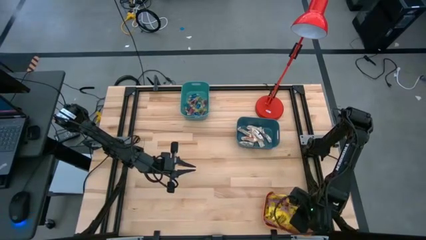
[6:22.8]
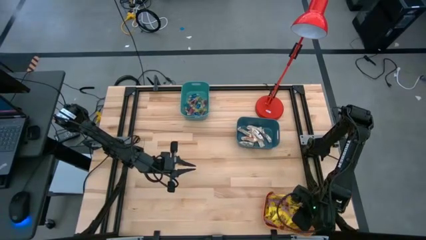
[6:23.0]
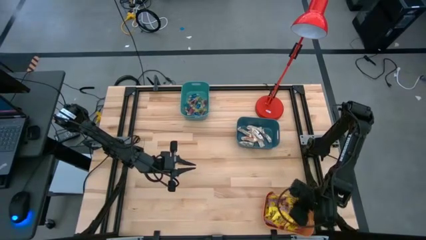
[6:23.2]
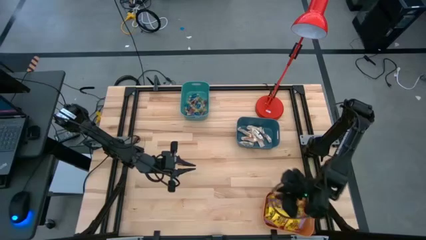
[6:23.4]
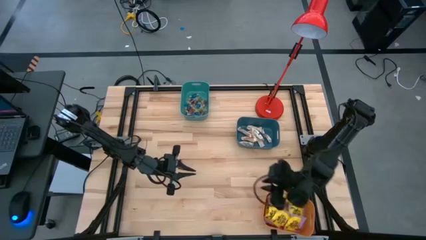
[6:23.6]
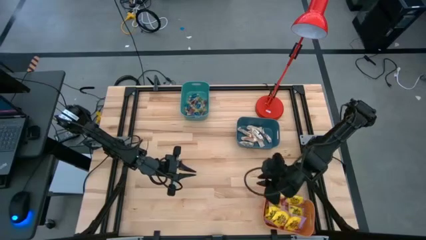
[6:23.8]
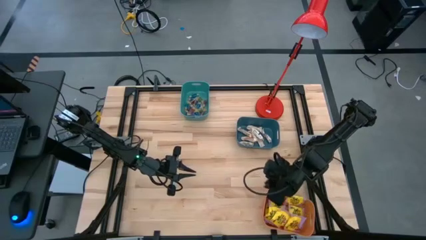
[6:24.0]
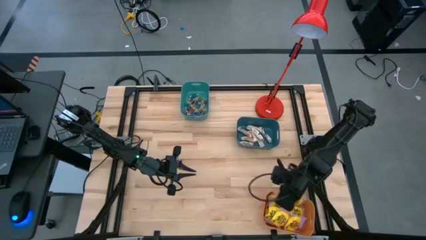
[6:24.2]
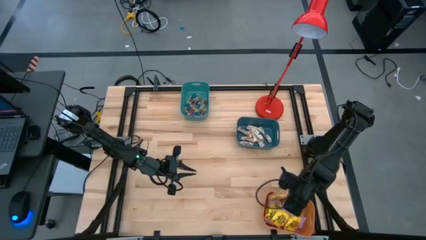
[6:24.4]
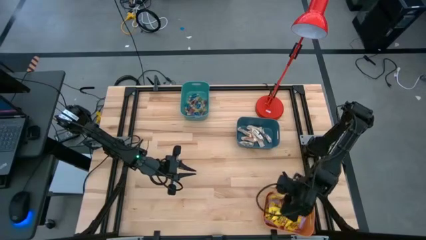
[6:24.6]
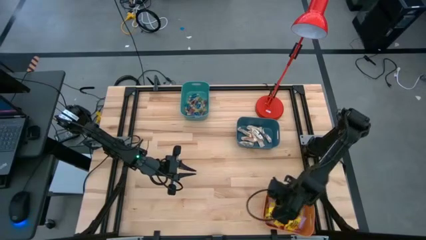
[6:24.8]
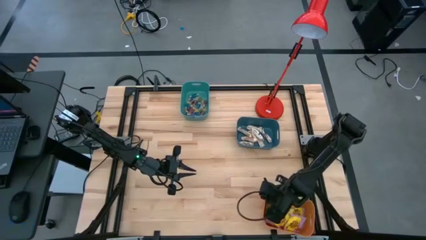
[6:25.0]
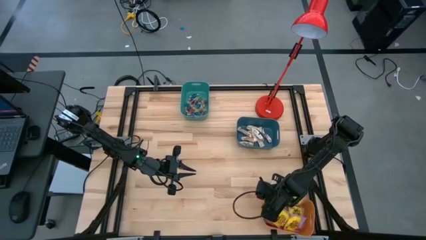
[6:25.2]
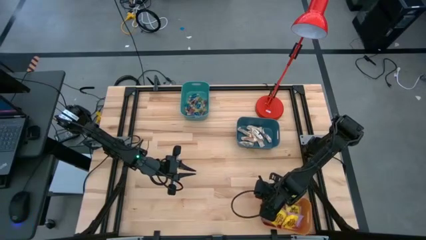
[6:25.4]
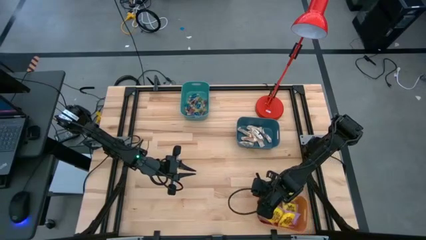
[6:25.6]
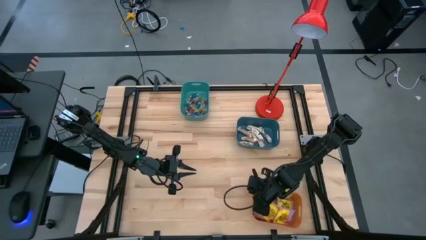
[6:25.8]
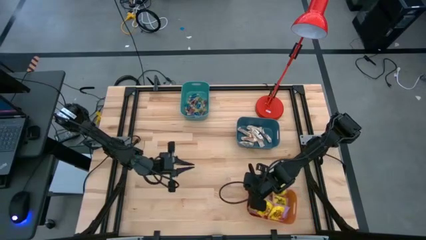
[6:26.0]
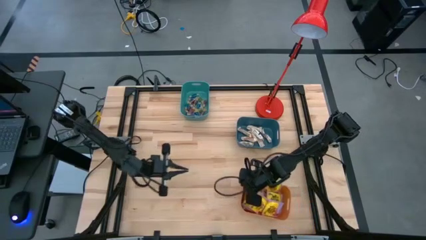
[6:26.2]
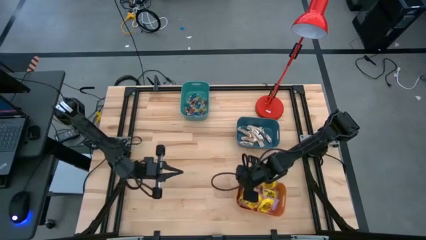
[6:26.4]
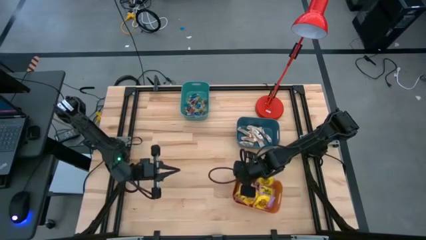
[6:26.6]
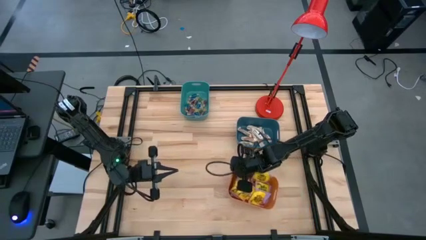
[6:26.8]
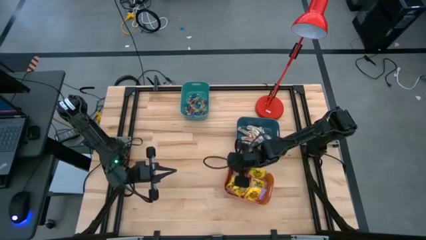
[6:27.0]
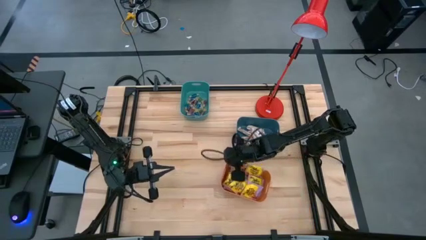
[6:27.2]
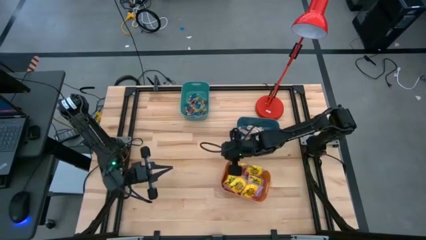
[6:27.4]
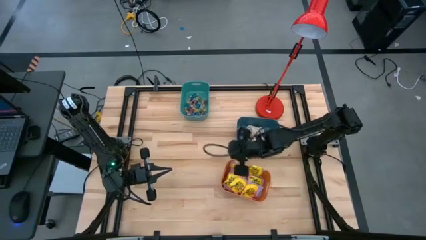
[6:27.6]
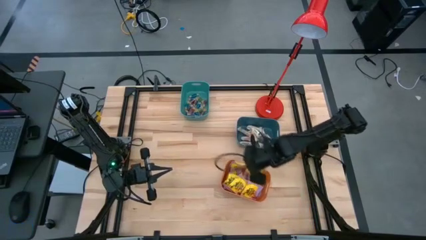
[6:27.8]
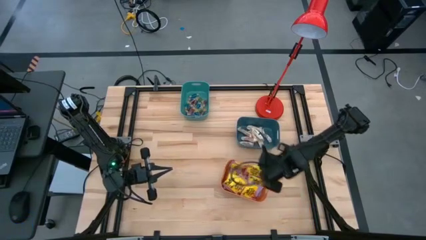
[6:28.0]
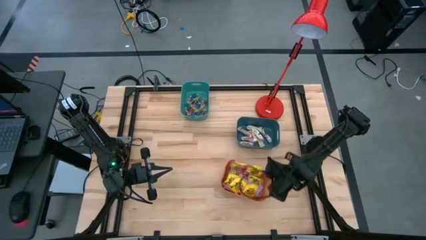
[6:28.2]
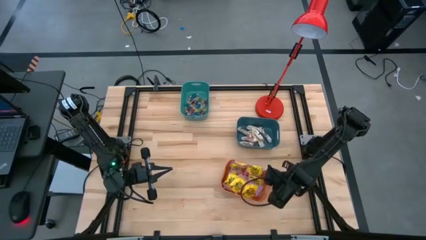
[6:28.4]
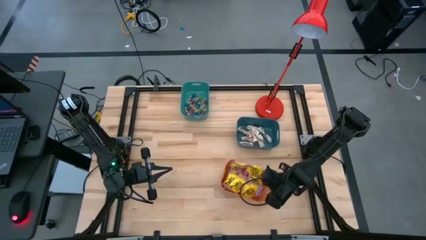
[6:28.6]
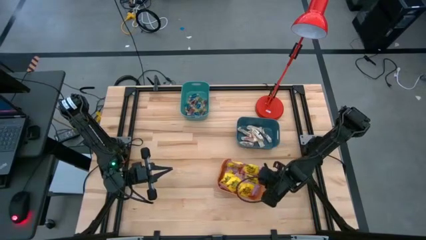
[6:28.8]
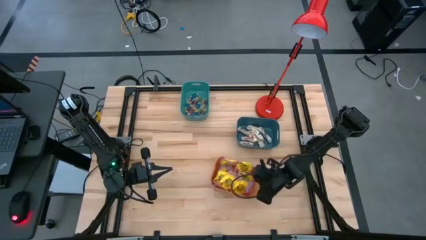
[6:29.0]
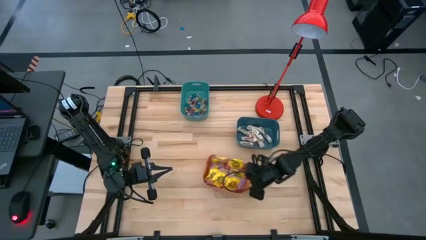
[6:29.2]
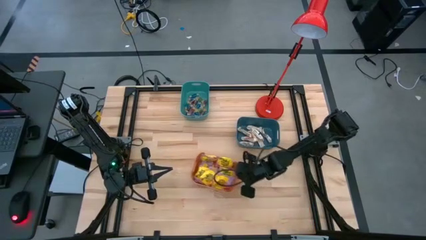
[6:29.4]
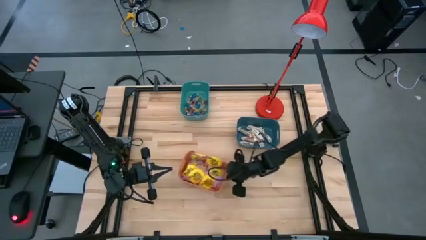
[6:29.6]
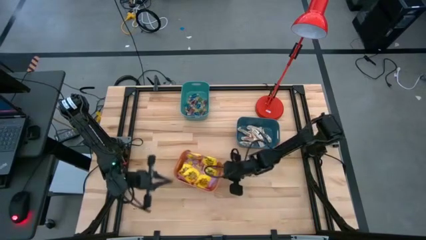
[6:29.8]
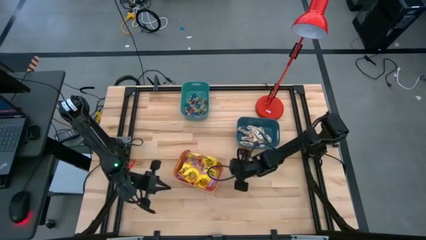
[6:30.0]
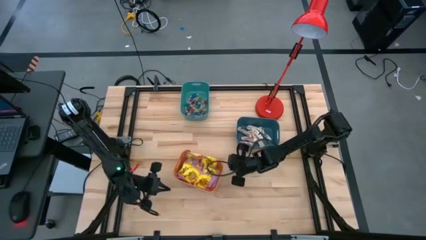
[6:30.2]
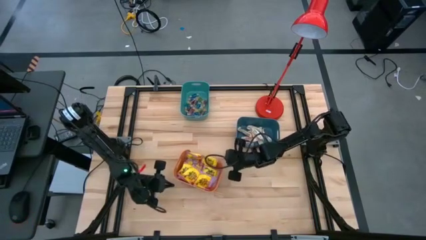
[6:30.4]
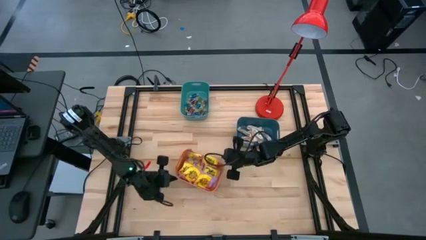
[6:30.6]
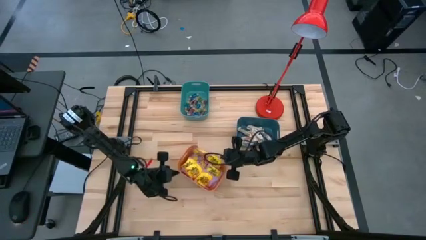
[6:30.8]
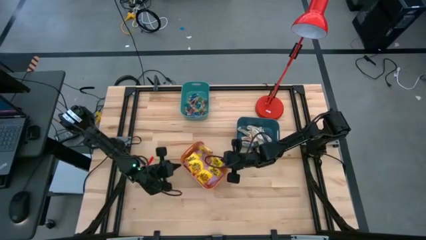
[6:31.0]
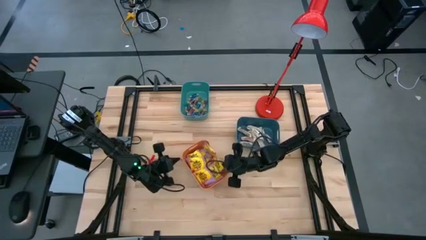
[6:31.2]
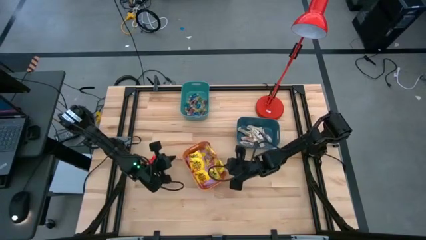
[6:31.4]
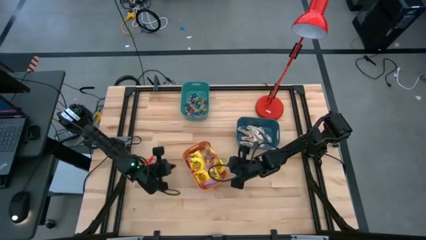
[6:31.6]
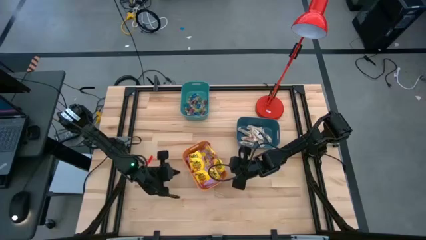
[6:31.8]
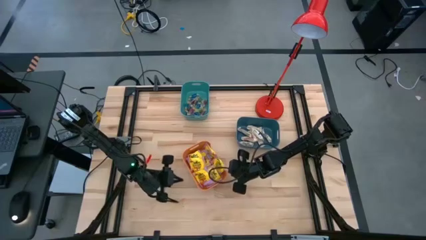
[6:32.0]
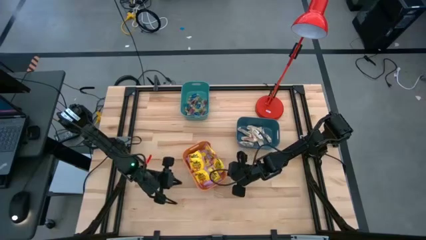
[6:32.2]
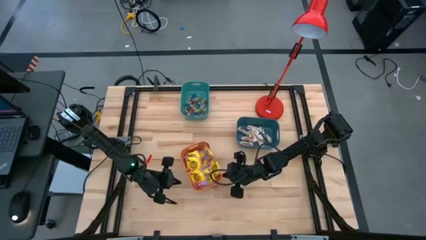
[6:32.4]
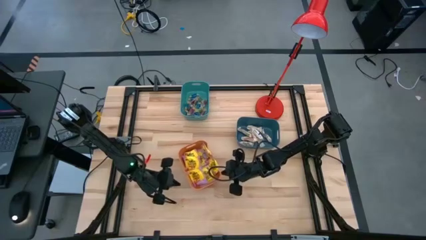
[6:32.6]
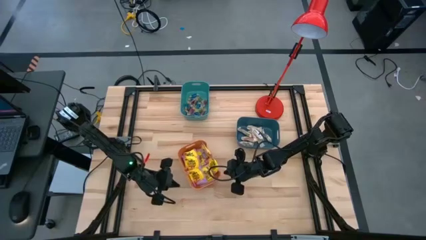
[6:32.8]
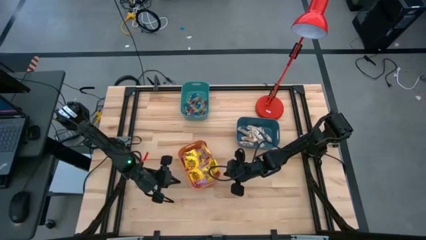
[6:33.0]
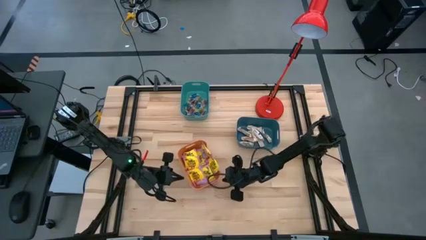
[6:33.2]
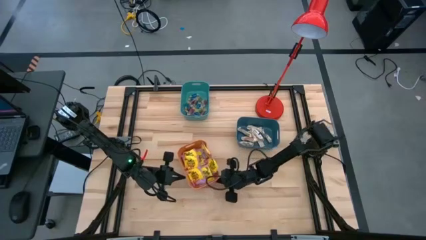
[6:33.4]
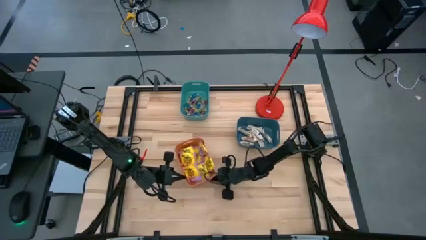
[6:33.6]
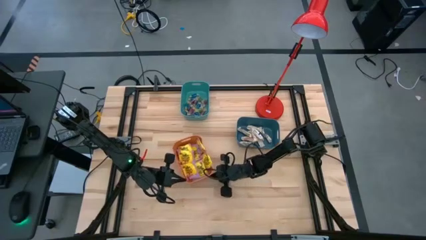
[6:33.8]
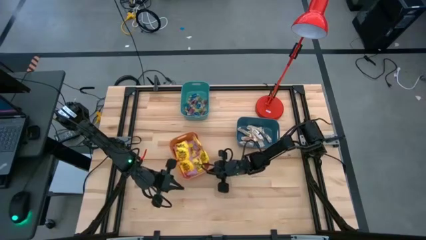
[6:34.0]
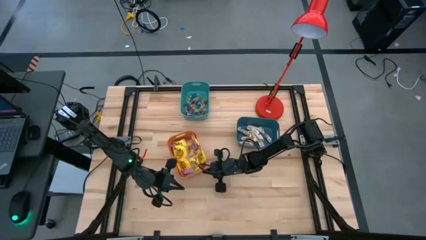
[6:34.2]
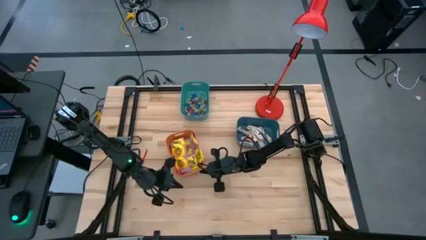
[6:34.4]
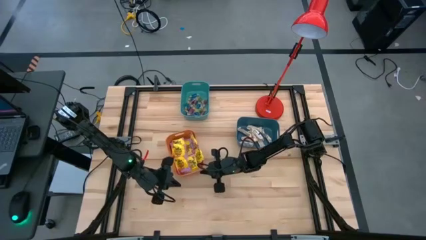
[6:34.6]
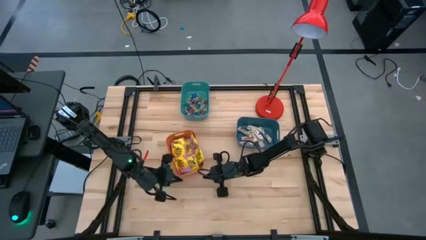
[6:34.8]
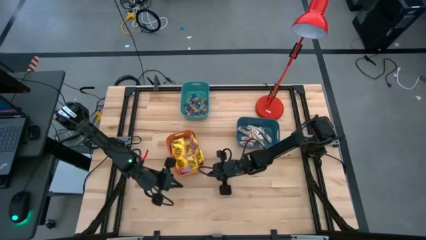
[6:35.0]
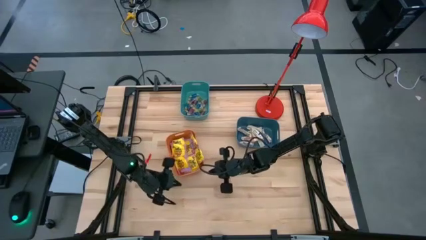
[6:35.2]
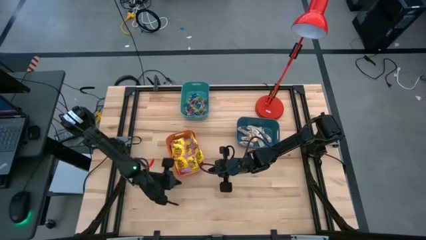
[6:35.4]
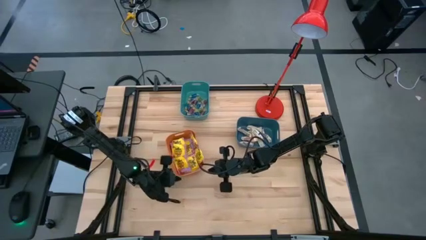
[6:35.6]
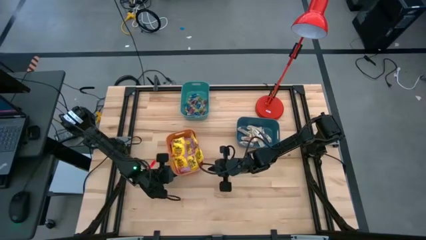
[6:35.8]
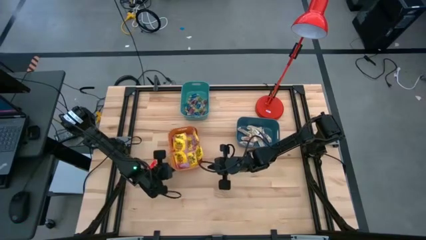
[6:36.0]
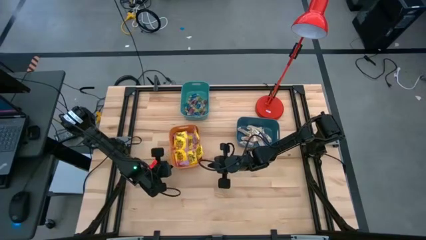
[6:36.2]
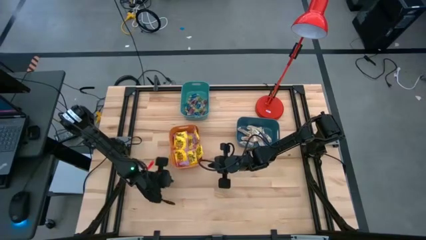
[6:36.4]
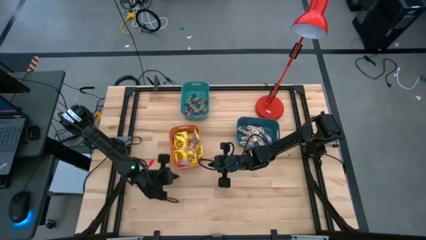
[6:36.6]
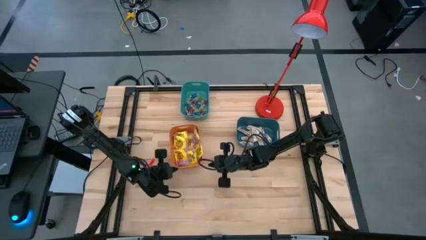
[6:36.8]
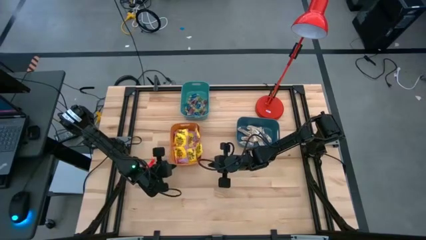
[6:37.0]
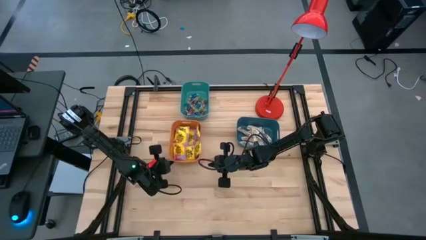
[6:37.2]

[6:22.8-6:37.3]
Task: Sort candy
Move the orange bin to the left side of the green bin
